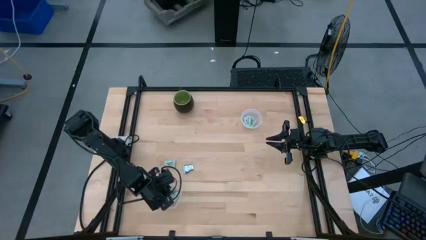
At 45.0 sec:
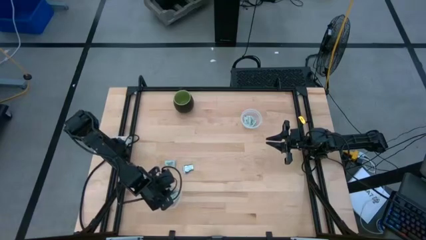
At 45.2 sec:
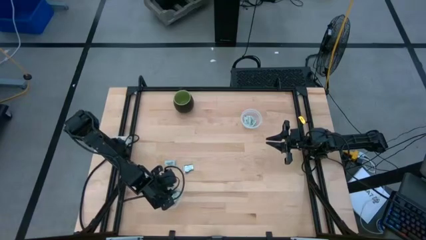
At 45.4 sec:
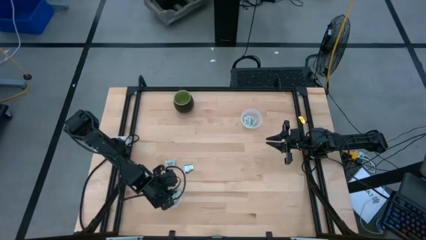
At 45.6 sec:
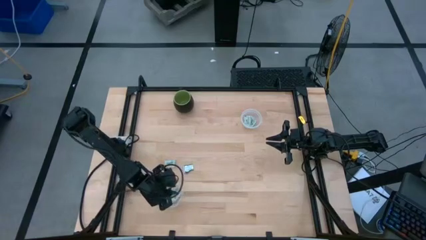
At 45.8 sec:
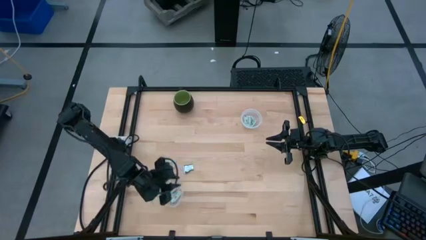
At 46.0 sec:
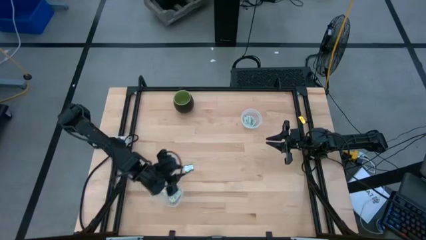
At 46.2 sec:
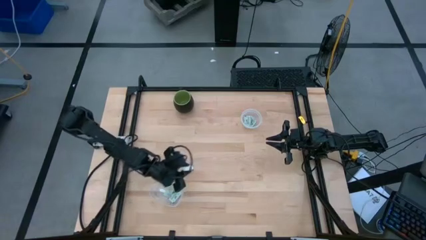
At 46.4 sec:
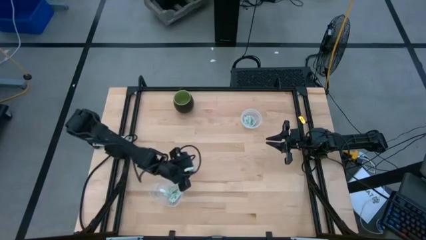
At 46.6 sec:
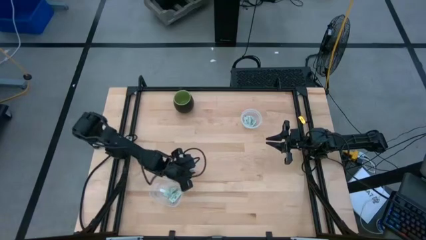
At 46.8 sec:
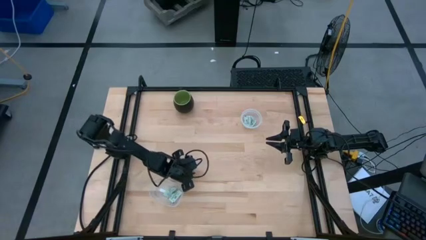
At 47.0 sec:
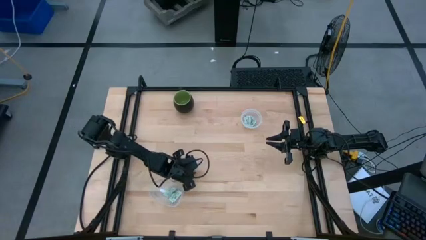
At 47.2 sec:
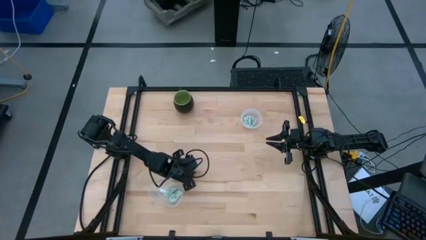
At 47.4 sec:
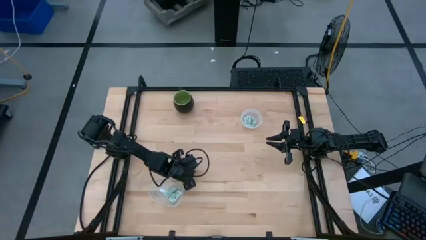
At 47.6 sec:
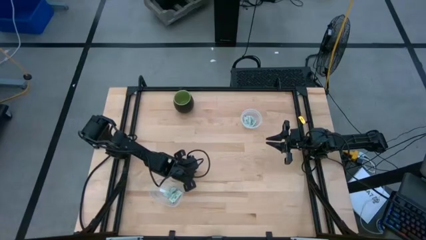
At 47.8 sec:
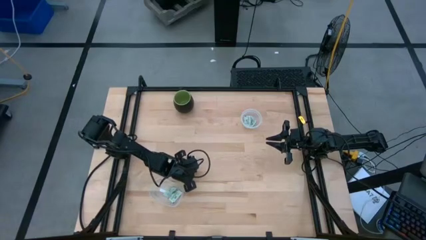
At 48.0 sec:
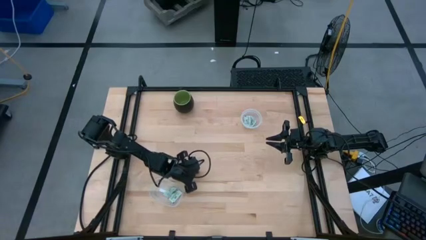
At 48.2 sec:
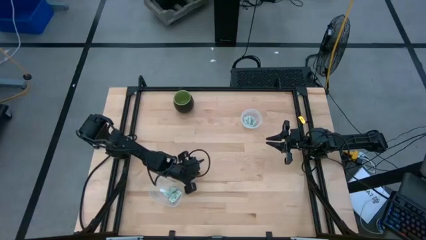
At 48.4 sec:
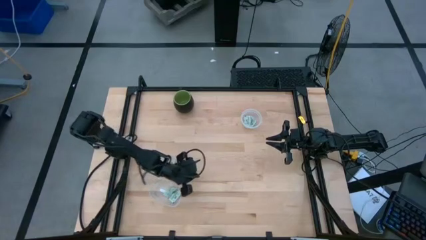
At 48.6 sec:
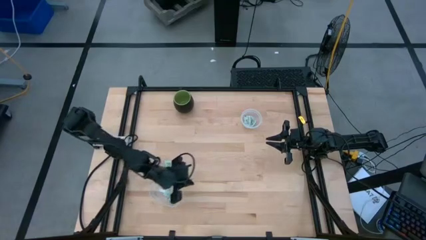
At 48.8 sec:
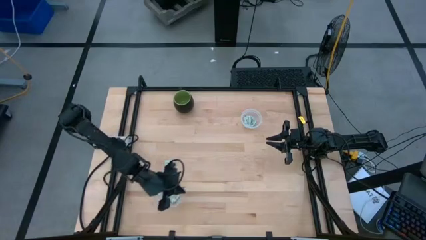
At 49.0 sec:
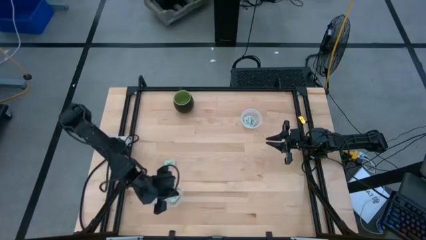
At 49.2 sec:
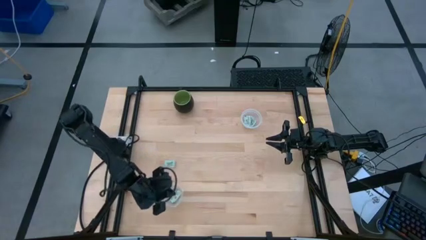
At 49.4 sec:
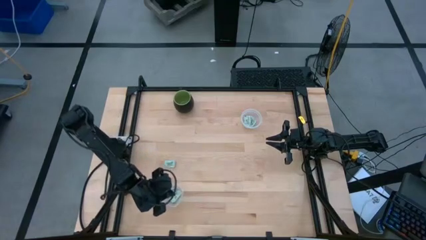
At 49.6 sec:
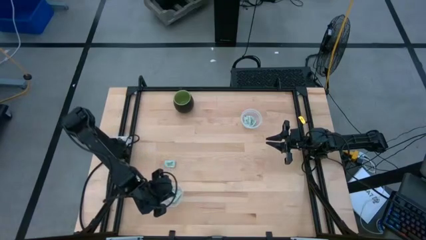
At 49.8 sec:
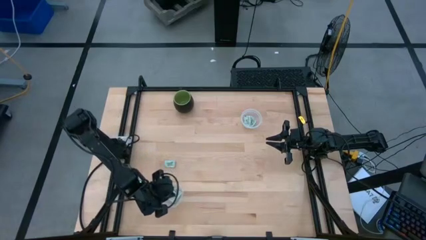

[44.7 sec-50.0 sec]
Task: Pick and place items into bin
Put the white truvia packet into the bottom transparent bin

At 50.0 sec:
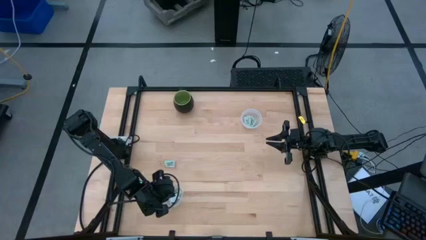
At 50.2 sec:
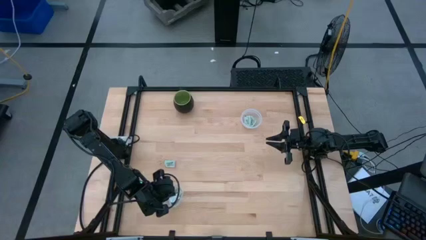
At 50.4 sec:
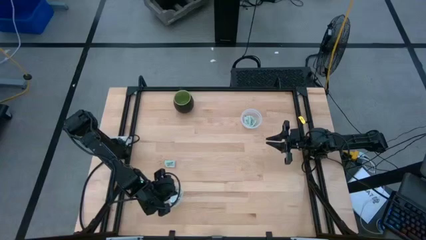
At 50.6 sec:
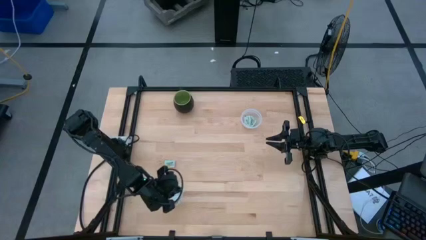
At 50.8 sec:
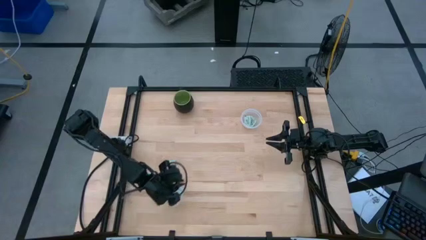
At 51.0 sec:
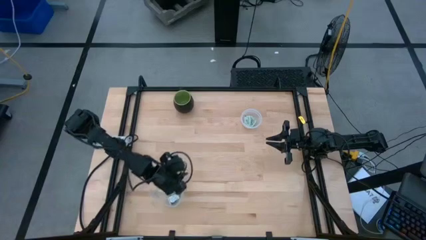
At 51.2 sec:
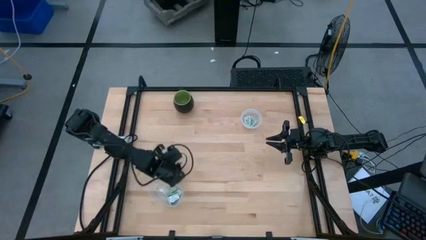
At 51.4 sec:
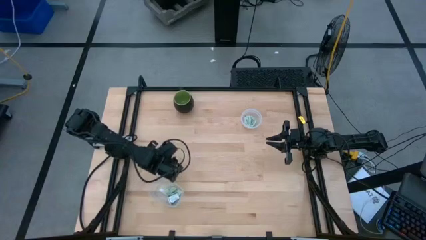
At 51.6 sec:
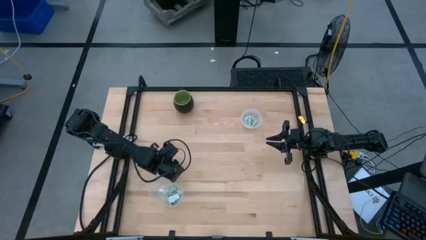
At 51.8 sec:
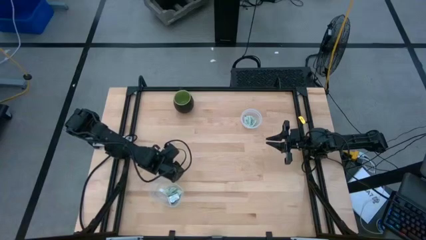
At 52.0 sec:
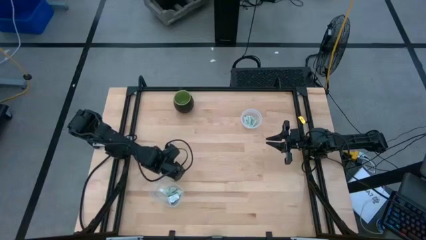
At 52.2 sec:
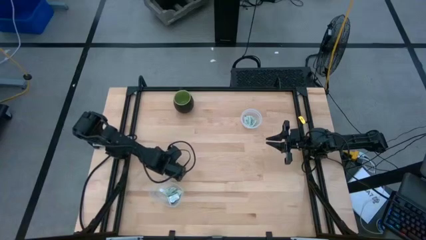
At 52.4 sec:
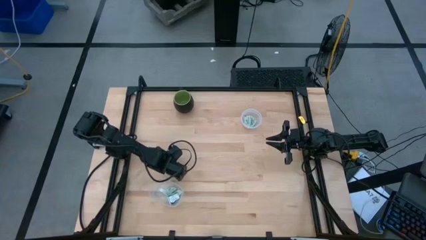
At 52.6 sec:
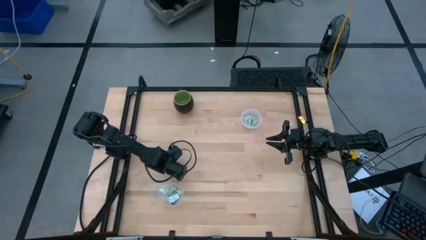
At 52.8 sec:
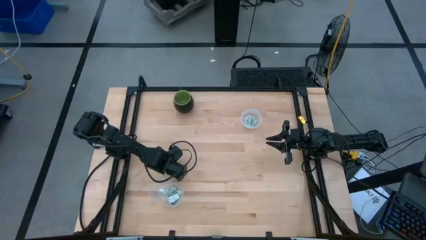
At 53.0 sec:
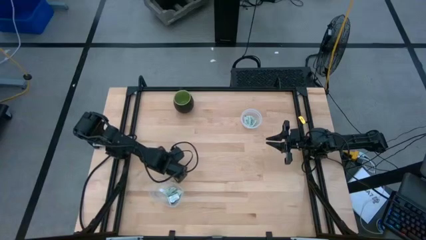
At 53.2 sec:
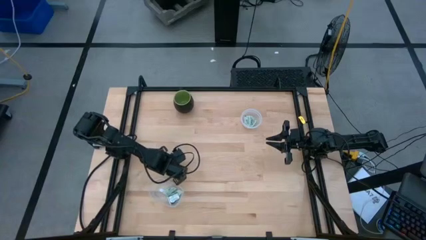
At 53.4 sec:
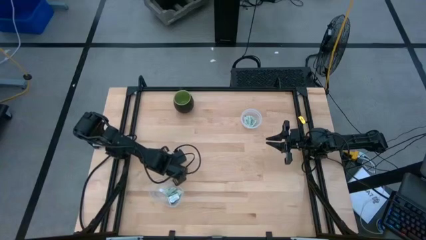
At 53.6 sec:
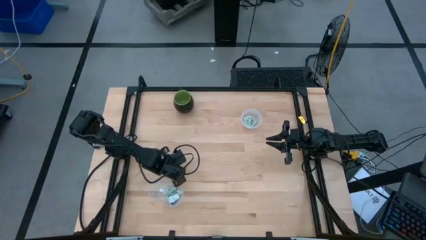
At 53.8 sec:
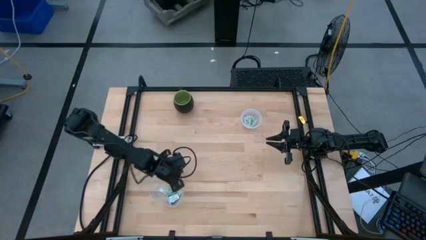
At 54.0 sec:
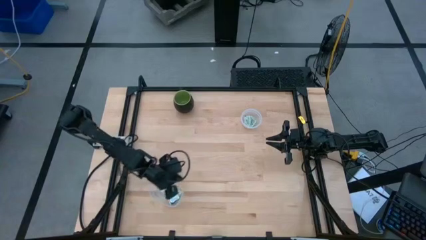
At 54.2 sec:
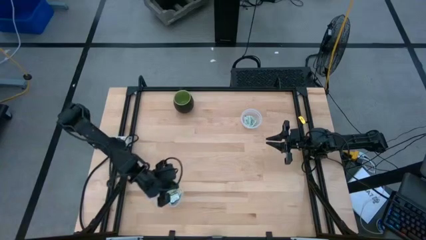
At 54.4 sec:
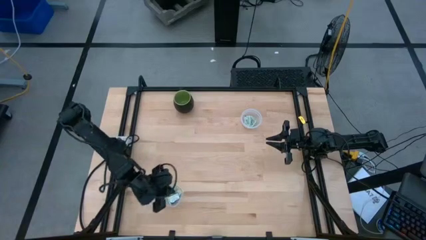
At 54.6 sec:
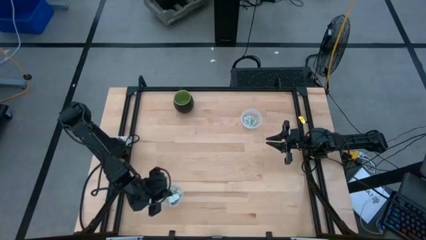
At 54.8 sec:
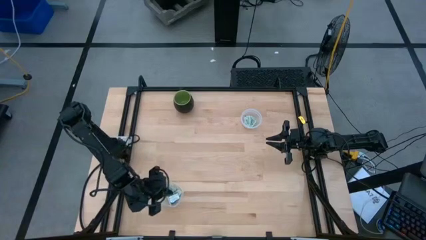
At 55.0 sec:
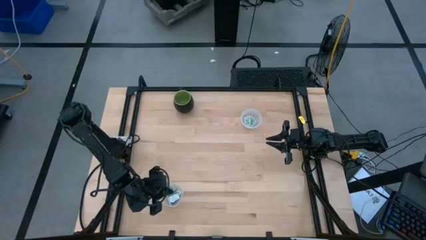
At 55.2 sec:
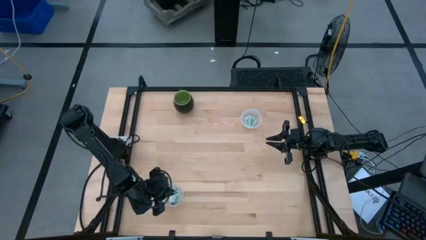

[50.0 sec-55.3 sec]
Put the green stevia packet into the bottom transparent bin

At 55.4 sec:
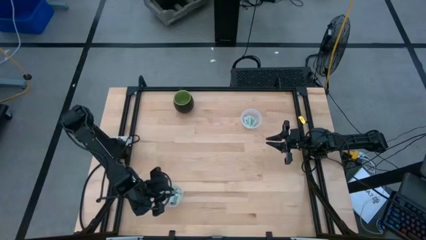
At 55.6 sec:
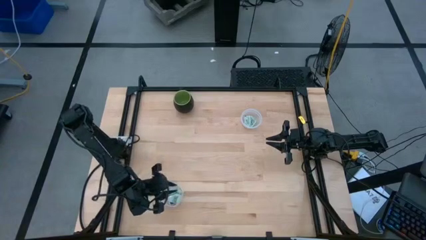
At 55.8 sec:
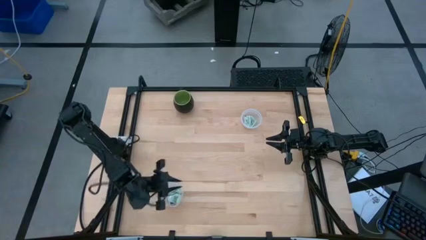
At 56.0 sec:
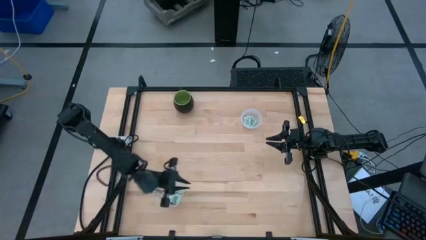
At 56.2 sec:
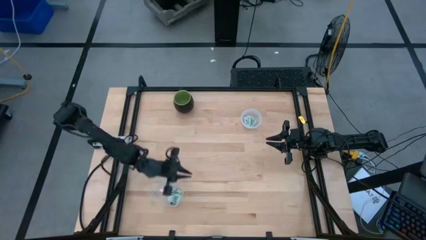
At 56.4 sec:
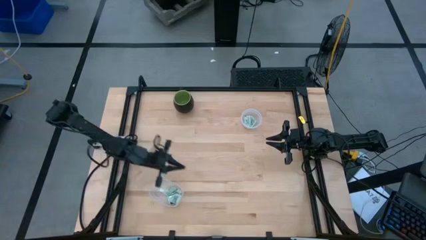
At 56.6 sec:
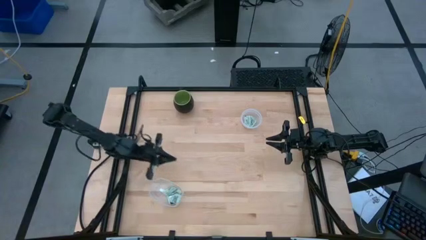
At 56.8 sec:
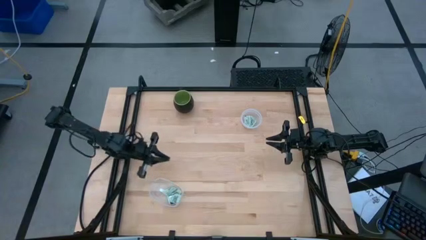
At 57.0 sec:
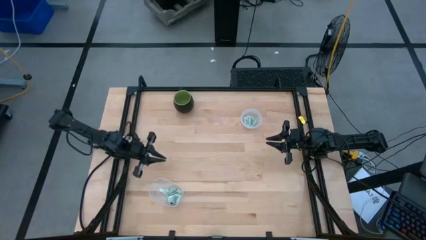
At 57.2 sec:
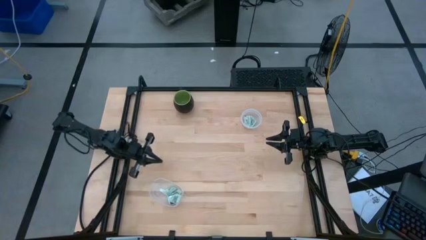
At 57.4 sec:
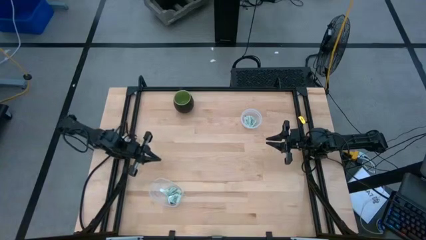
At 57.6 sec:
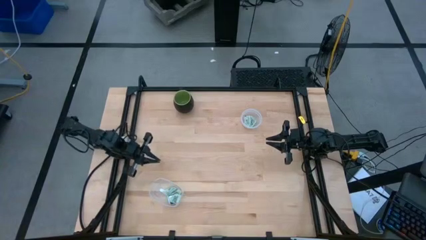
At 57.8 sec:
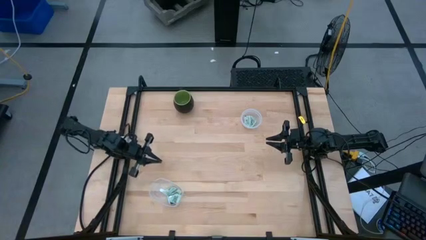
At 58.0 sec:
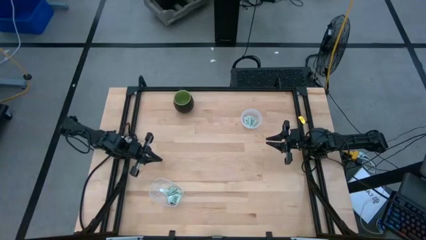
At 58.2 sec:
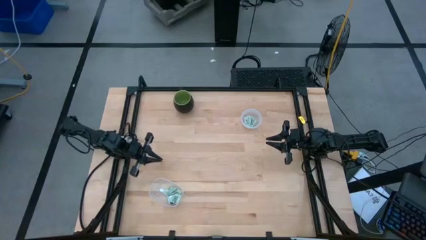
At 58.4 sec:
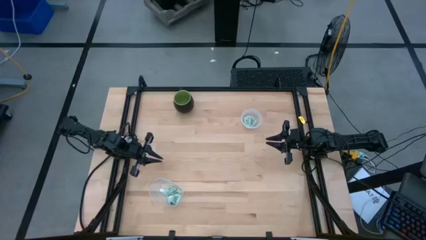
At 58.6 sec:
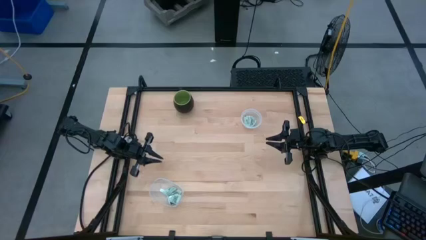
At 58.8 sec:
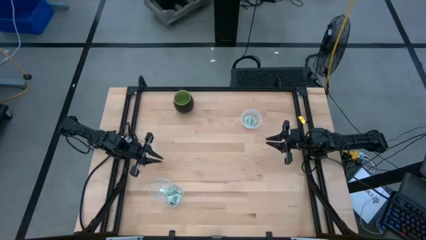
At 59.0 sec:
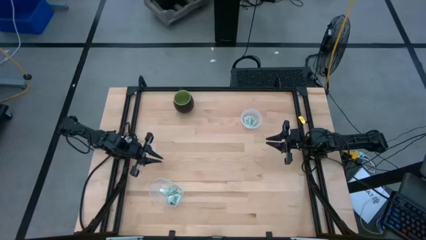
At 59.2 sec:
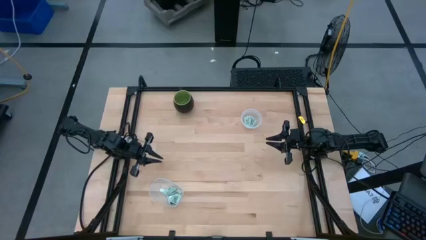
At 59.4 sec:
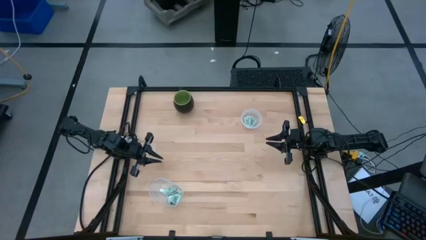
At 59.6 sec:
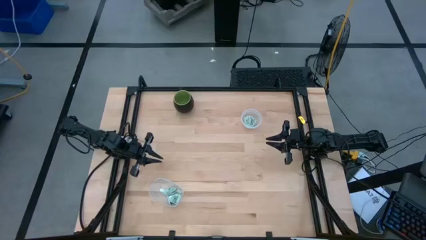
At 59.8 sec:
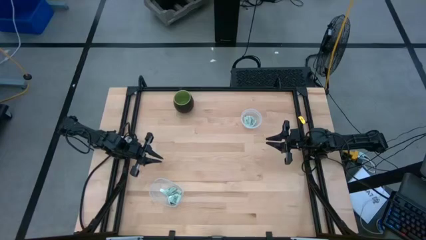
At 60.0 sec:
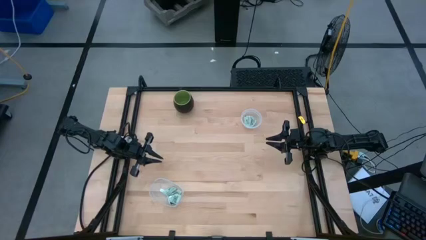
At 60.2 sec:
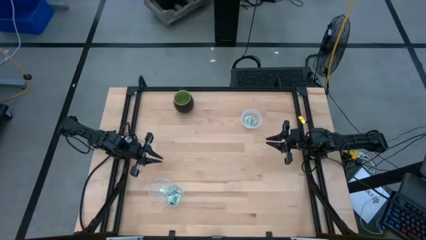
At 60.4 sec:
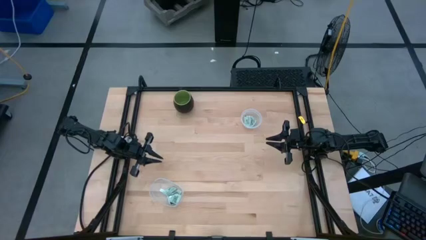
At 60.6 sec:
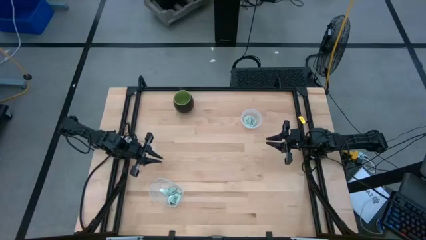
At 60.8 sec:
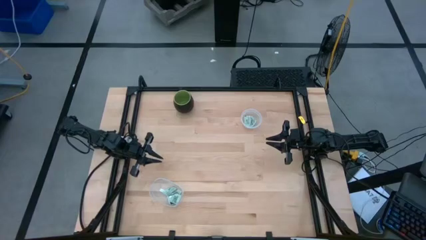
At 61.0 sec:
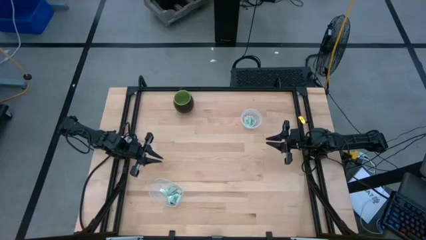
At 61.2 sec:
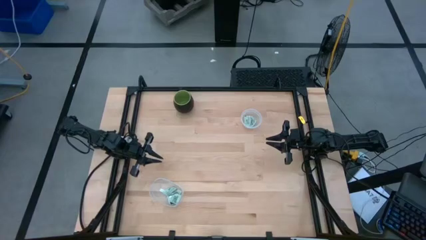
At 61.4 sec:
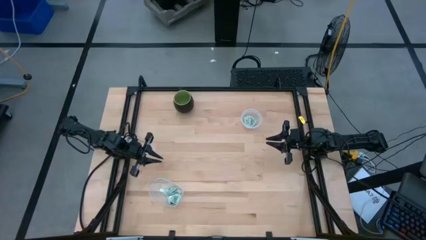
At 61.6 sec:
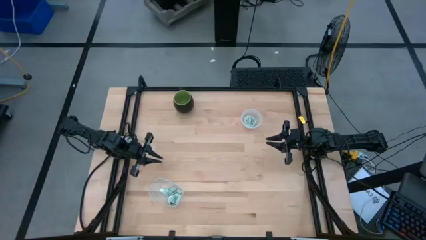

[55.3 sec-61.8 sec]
Return to Home Position
